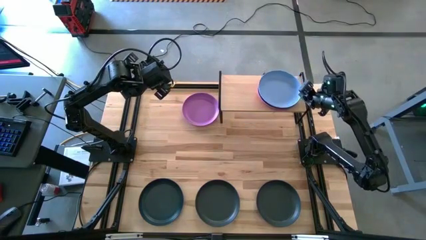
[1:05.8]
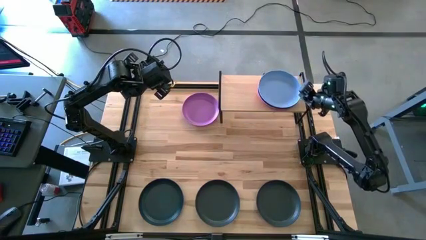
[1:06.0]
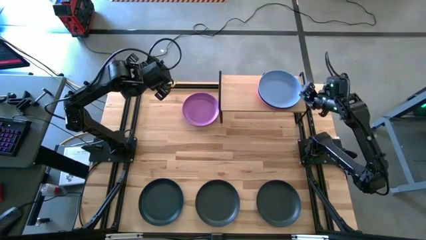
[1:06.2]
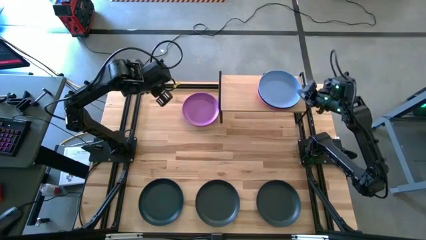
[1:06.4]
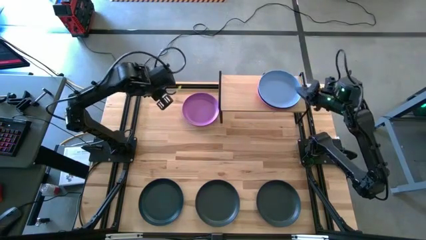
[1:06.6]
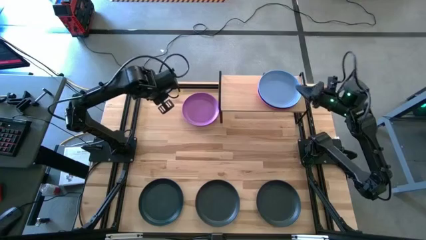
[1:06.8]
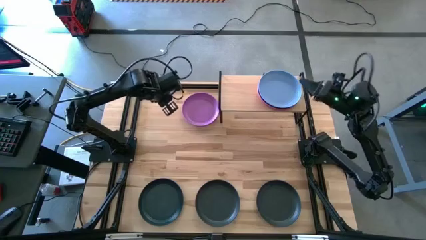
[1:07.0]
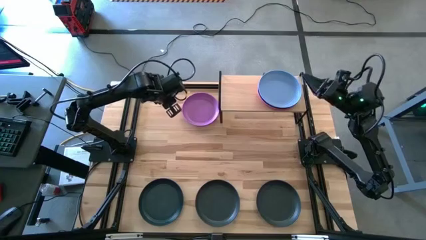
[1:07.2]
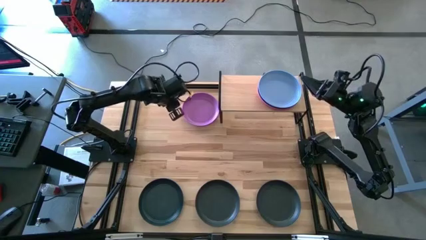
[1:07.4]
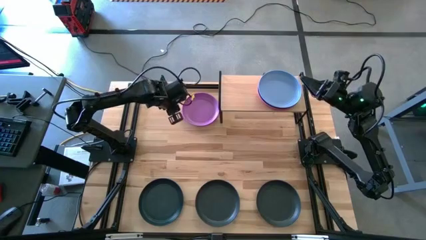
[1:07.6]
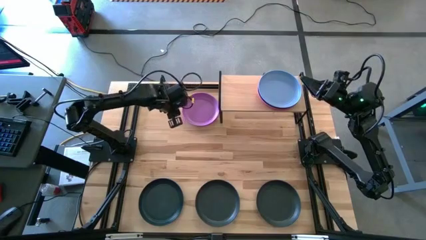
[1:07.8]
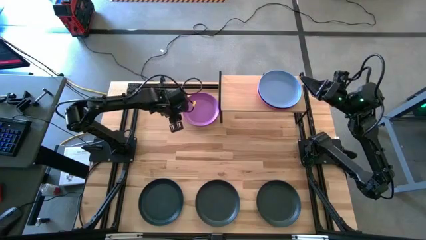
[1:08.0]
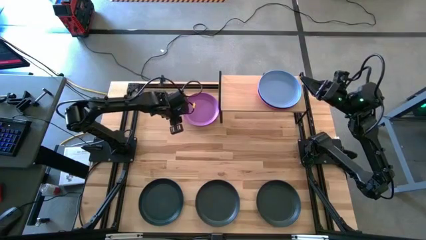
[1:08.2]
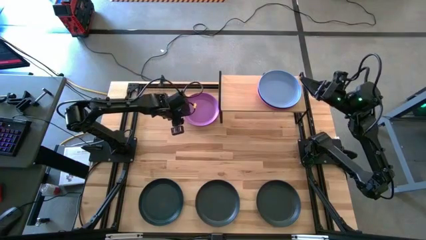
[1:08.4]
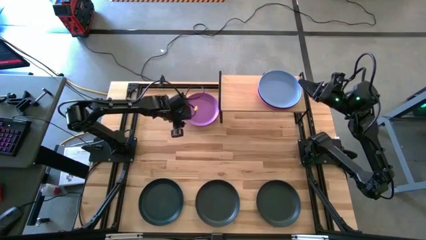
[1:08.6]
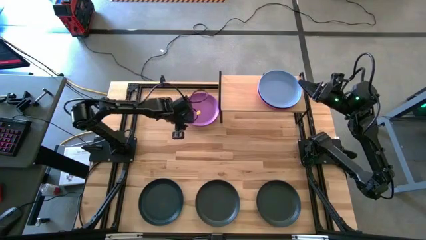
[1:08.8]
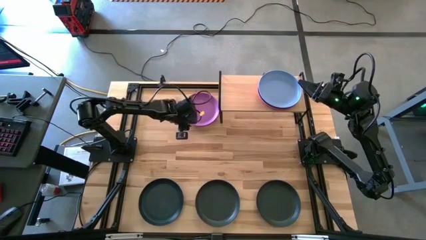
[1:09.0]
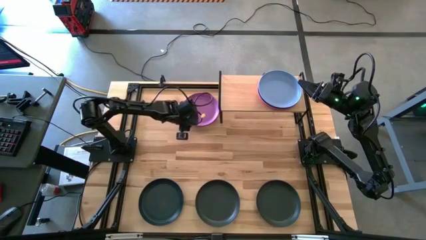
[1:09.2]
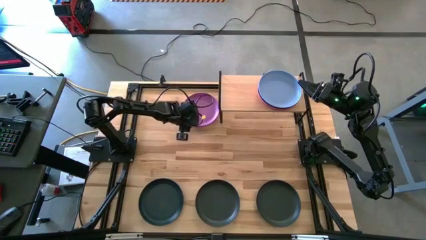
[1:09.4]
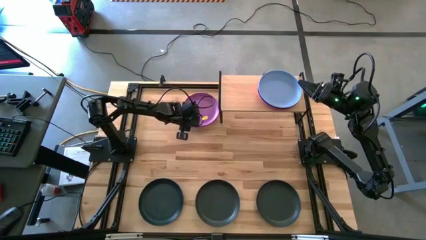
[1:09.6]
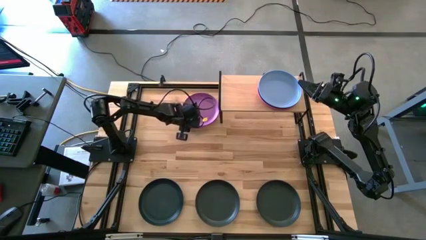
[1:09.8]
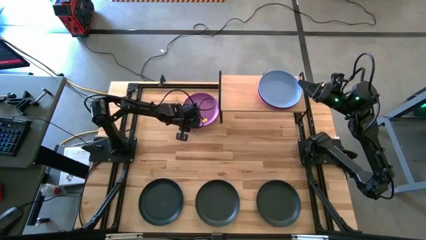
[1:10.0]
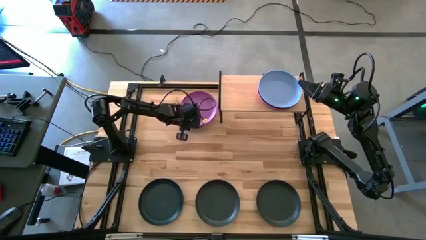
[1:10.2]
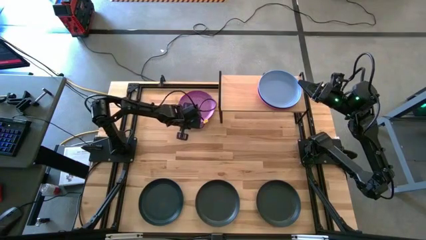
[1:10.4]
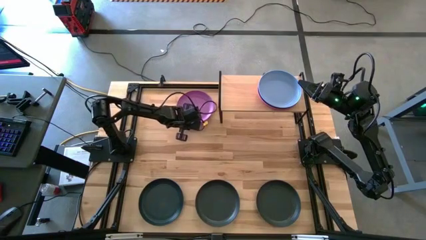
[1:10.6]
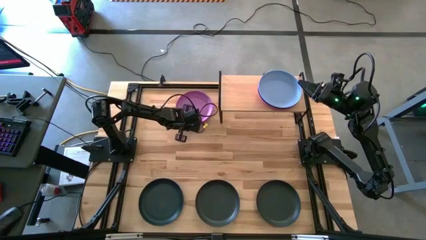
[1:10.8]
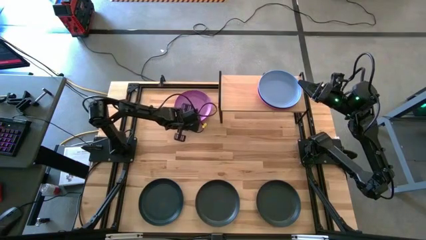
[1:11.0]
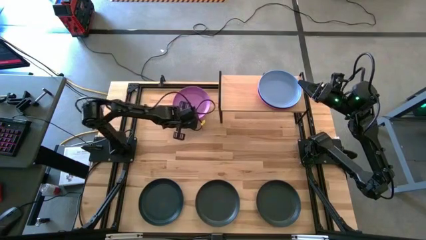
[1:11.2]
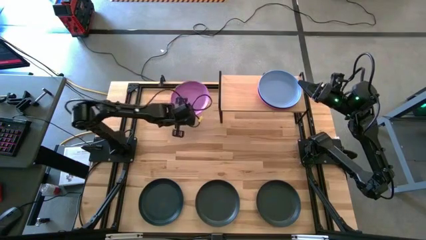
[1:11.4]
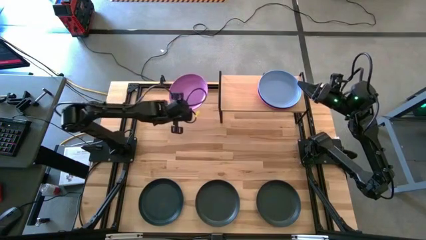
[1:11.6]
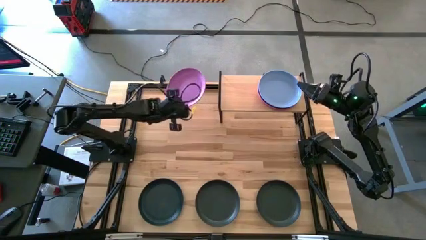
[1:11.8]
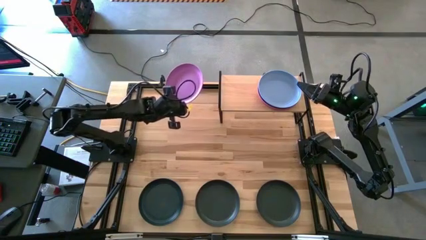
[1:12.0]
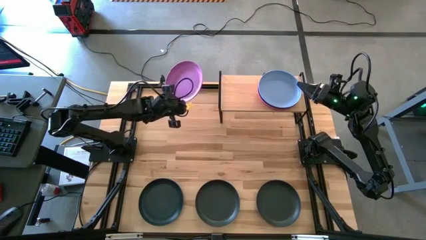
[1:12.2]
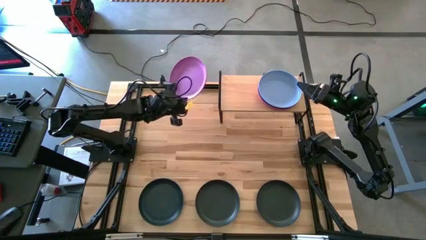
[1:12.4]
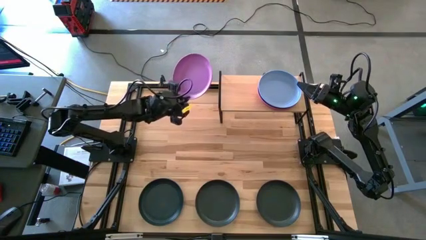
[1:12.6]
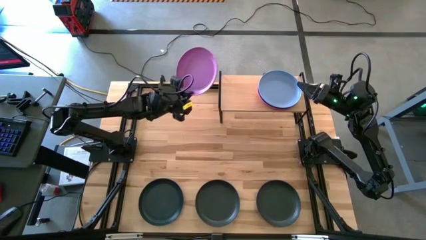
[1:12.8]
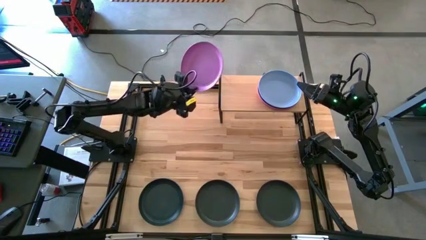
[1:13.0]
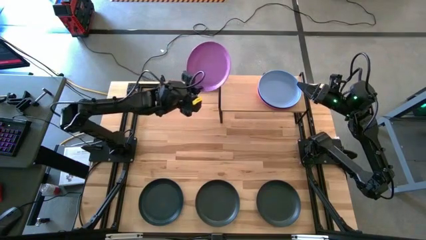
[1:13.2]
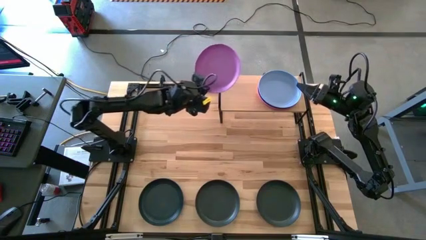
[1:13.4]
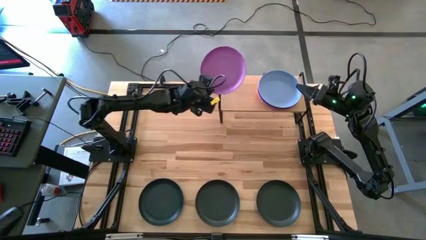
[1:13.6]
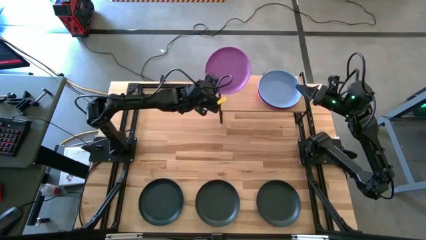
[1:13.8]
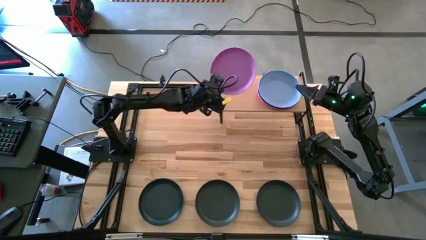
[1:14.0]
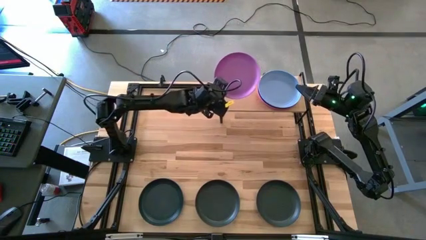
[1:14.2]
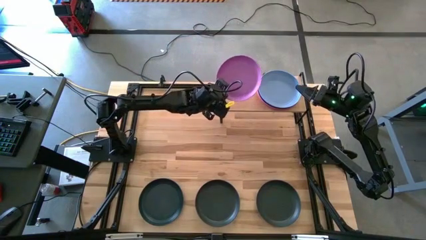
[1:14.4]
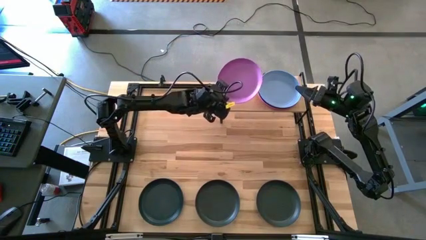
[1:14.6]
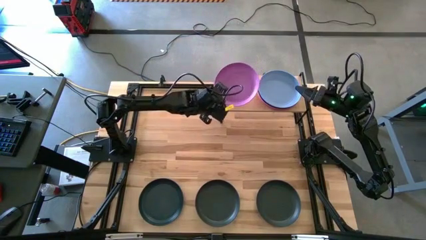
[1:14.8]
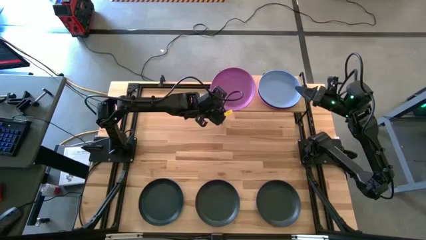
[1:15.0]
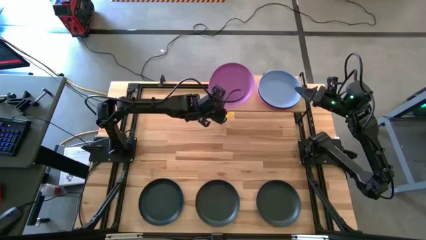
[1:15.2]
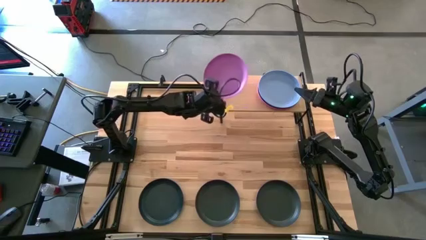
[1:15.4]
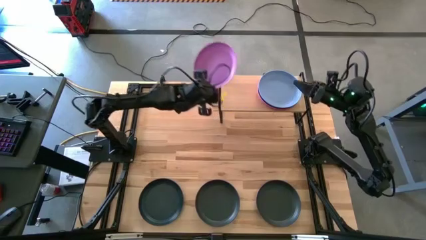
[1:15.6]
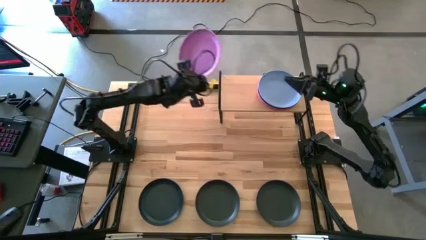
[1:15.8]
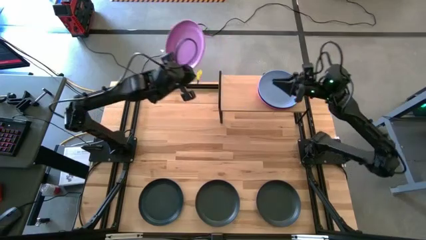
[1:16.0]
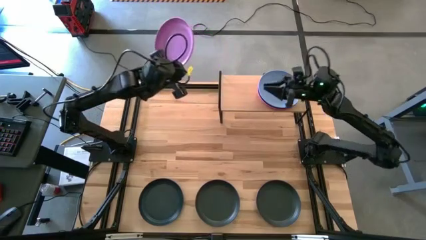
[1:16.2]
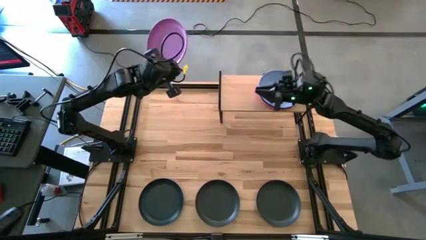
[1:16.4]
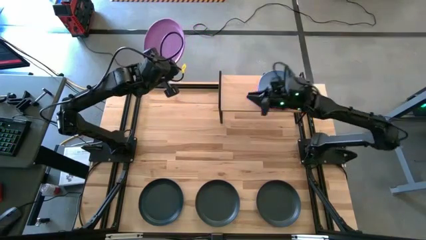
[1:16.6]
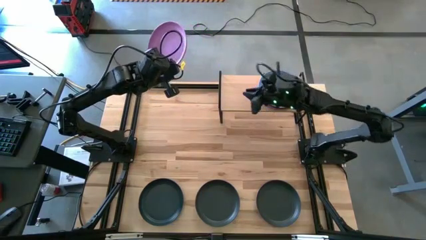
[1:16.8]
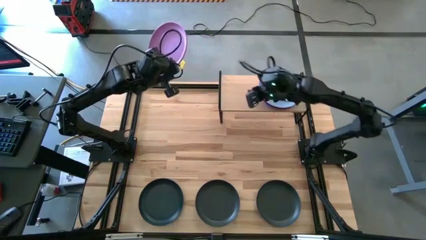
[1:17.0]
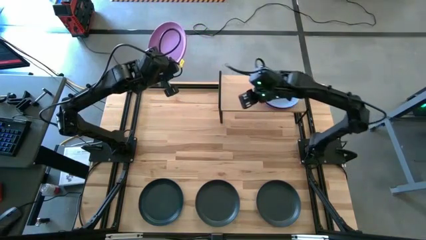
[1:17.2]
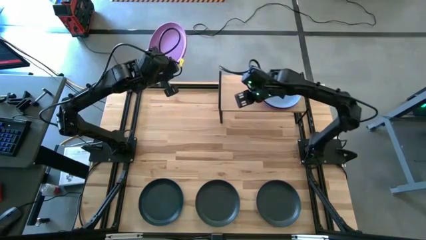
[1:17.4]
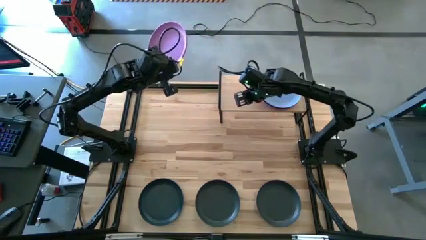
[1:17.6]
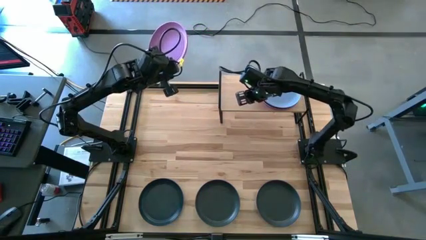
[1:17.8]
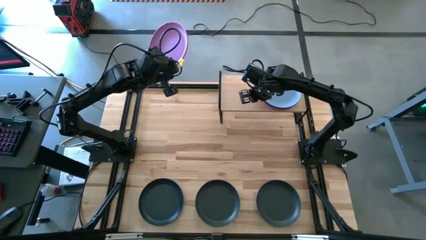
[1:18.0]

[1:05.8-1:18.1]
Task: Place and stack plates onto a shelf
Put the violet plate on the shelf

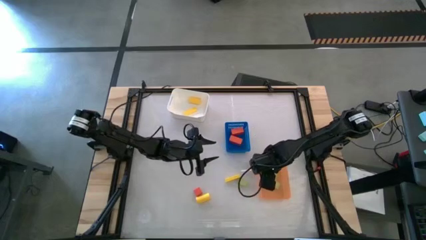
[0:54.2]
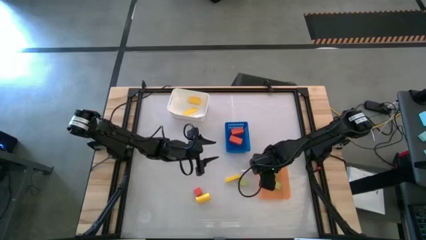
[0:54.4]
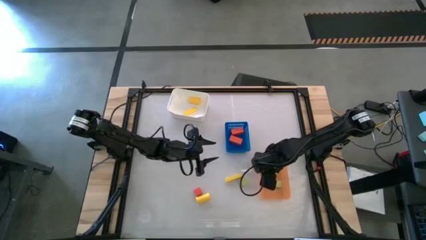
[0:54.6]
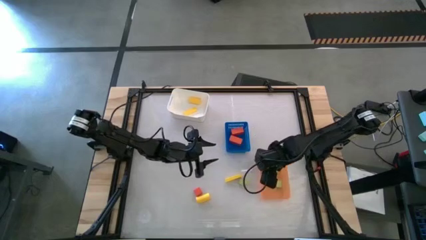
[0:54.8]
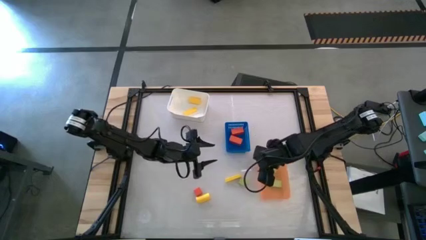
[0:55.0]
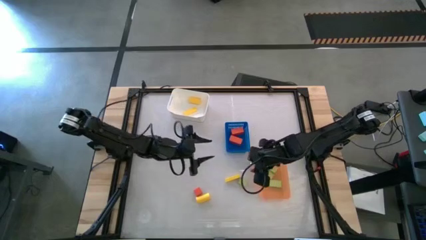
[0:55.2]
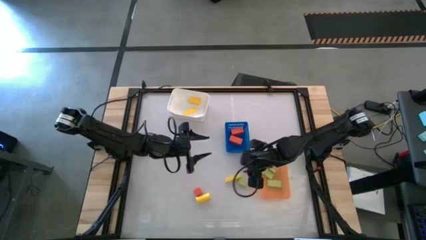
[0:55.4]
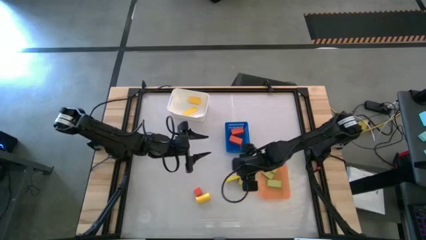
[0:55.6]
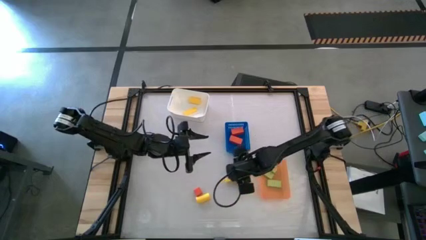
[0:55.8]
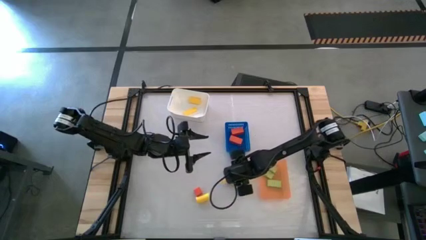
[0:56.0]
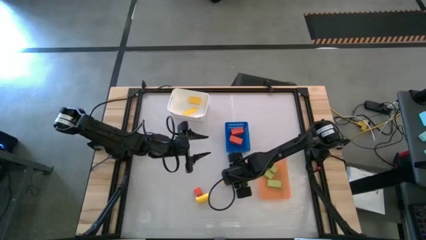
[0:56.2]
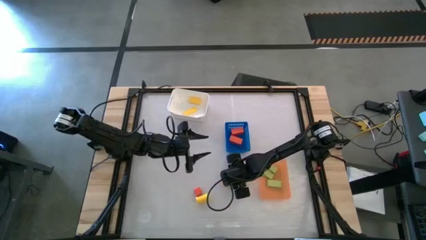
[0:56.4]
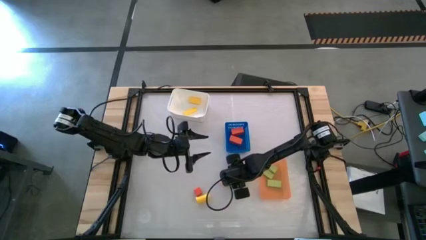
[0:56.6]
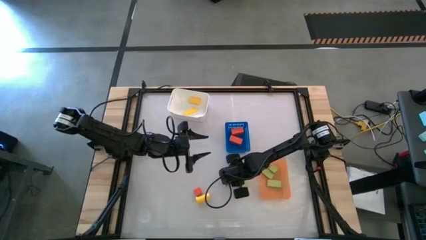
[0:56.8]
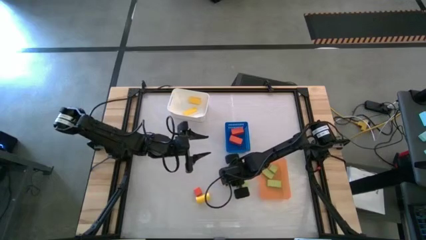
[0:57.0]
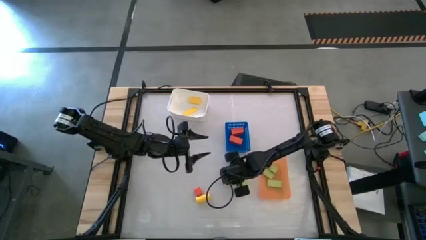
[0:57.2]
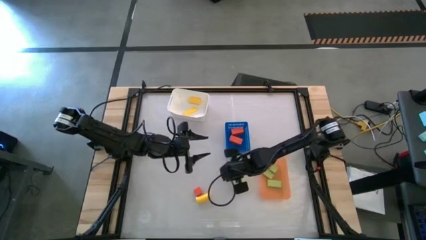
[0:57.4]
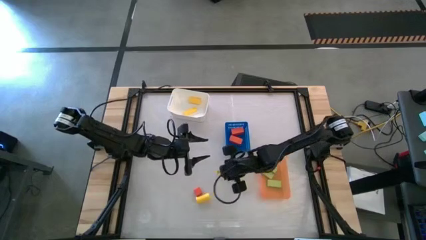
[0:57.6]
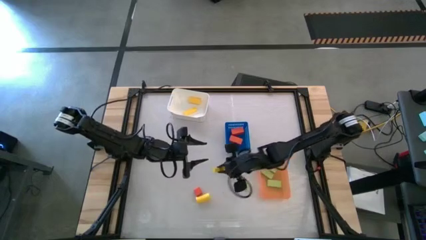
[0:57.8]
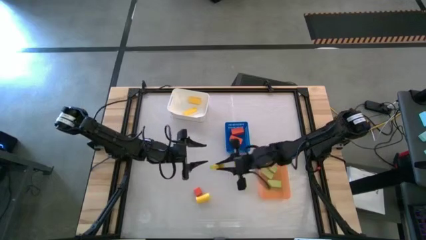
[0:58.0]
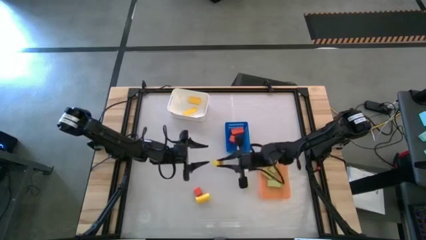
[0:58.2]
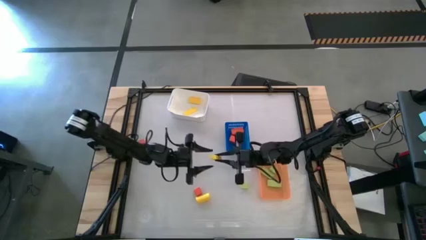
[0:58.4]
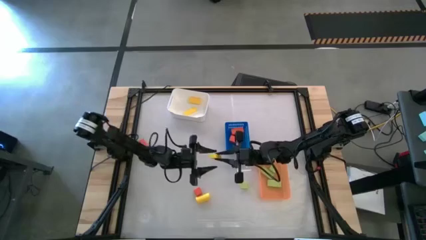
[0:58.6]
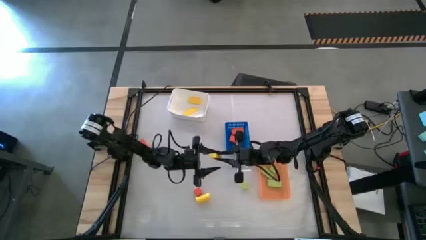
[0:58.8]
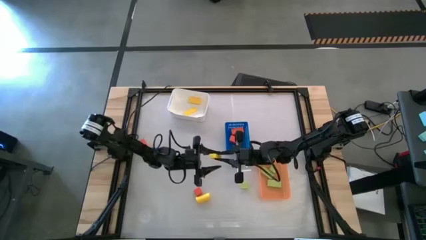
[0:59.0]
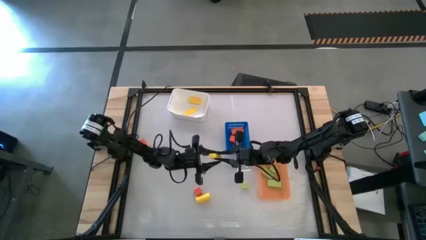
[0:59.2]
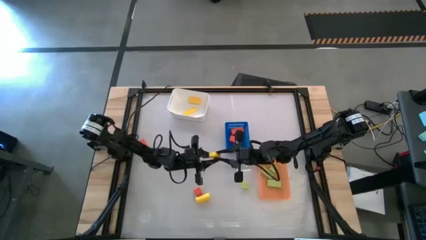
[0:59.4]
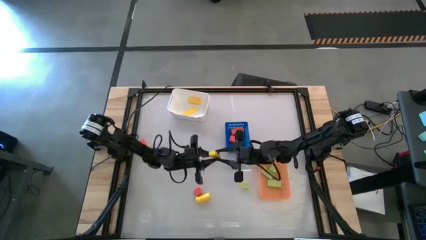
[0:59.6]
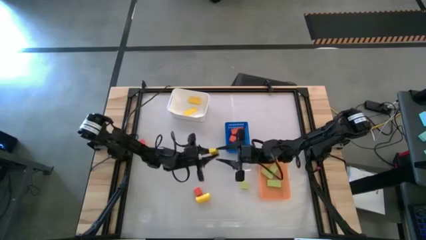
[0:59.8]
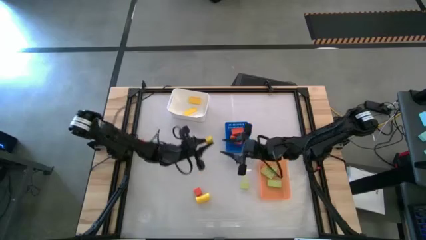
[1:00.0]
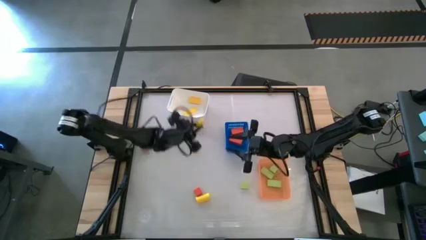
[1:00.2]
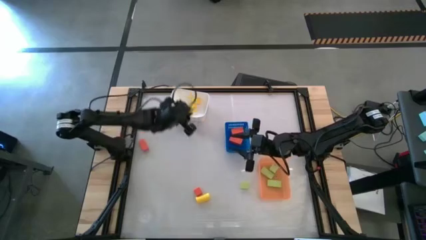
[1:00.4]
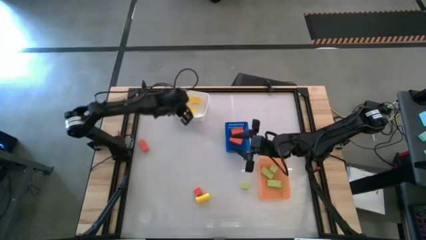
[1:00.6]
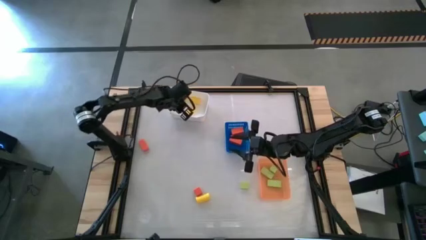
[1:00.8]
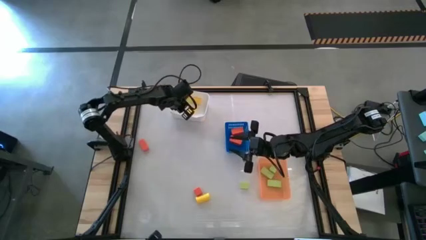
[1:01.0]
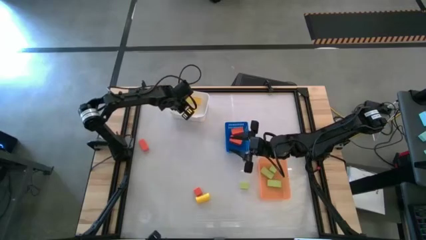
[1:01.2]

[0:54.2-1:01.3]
Task: Sort & place blocks by color
Put the yellow block into the white bin
